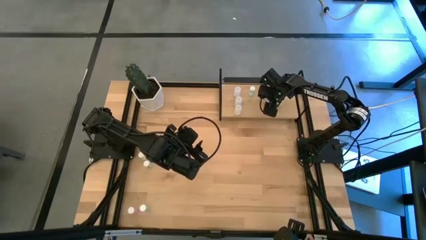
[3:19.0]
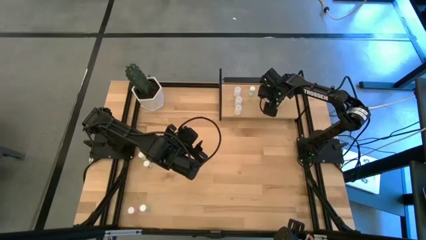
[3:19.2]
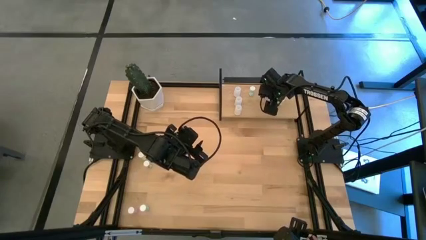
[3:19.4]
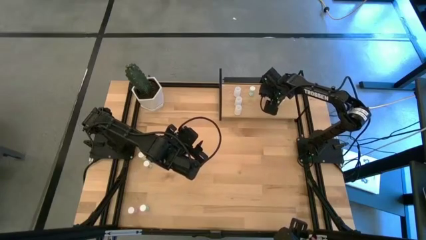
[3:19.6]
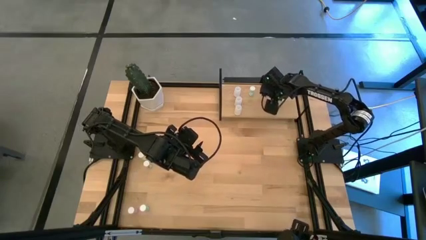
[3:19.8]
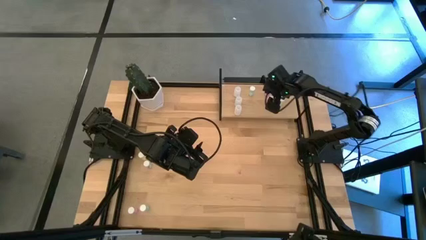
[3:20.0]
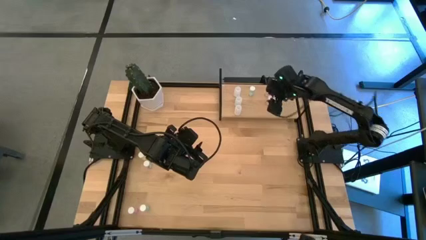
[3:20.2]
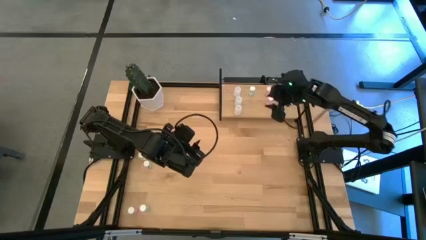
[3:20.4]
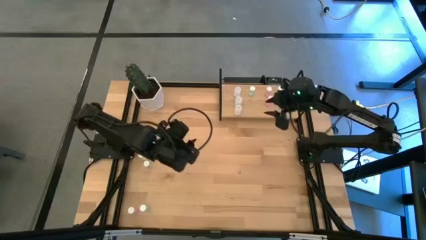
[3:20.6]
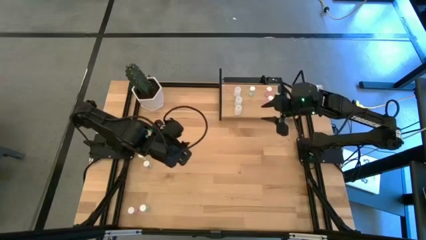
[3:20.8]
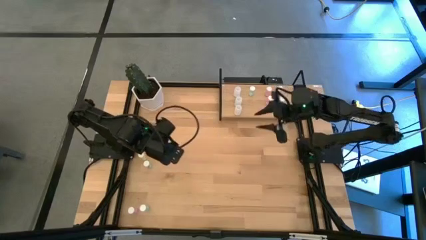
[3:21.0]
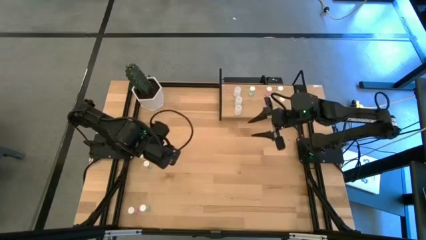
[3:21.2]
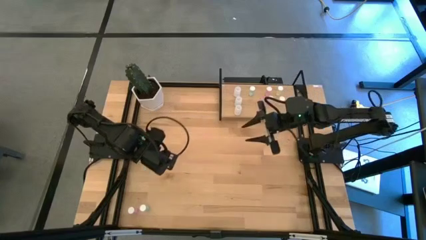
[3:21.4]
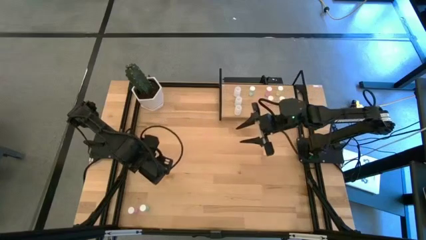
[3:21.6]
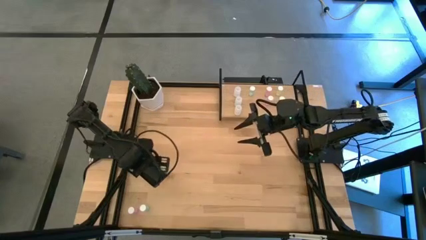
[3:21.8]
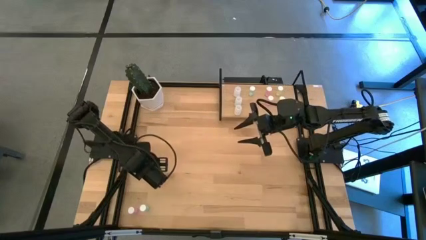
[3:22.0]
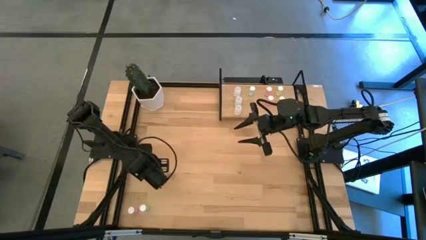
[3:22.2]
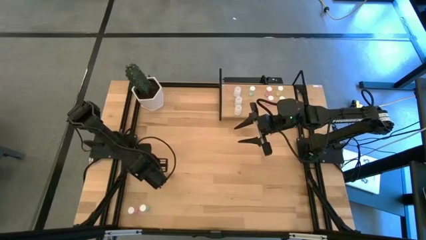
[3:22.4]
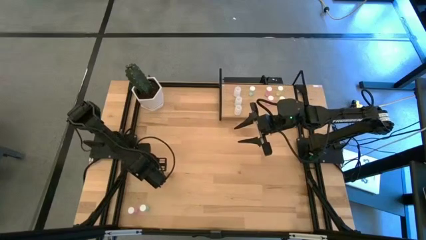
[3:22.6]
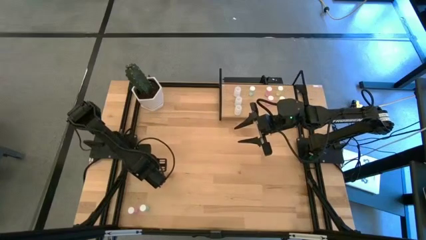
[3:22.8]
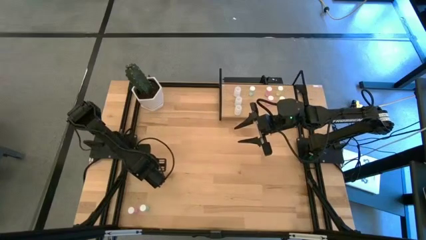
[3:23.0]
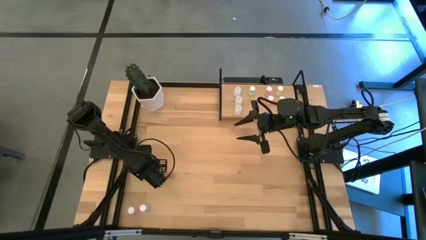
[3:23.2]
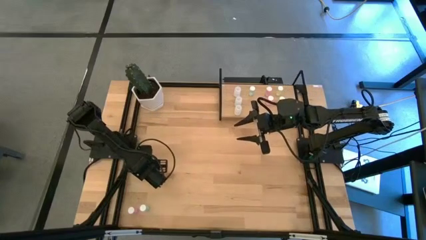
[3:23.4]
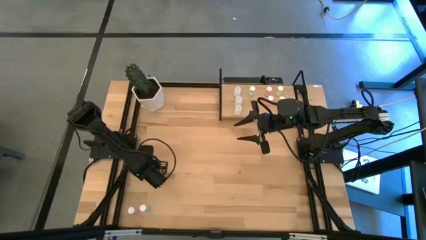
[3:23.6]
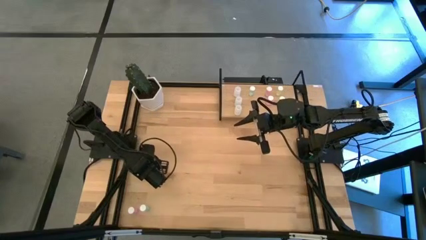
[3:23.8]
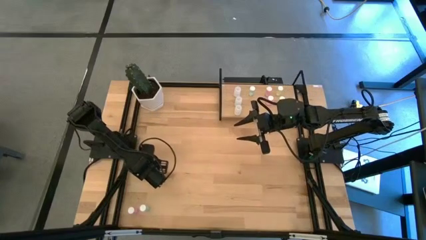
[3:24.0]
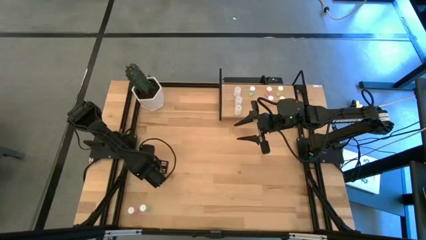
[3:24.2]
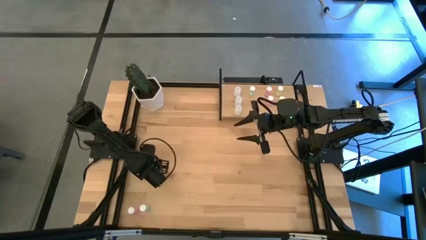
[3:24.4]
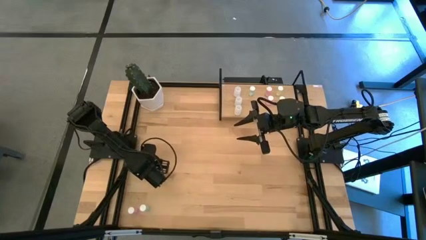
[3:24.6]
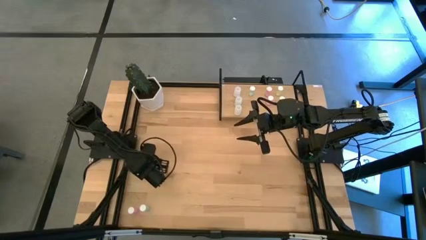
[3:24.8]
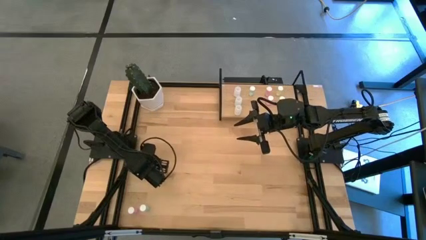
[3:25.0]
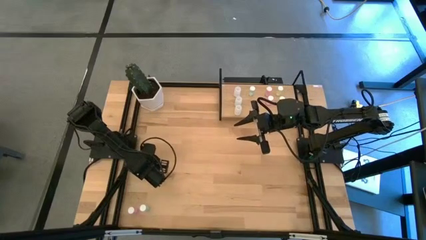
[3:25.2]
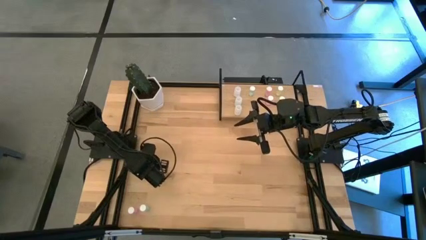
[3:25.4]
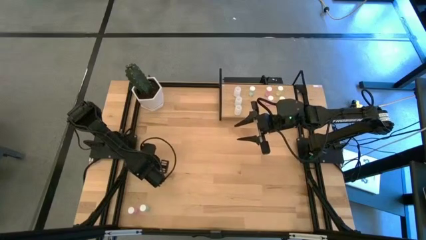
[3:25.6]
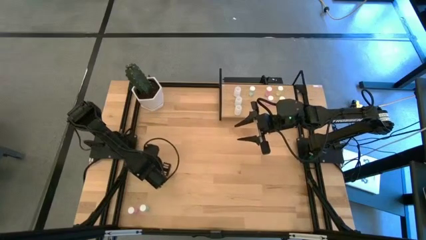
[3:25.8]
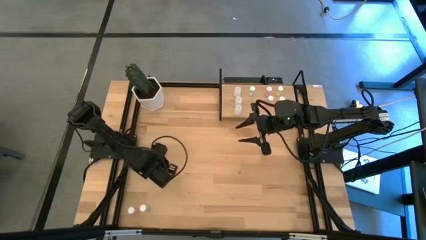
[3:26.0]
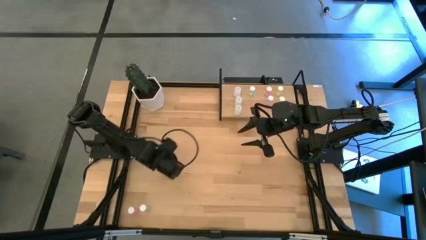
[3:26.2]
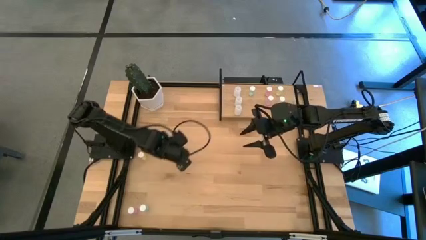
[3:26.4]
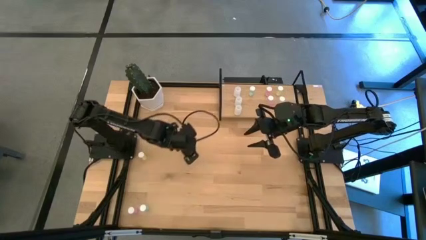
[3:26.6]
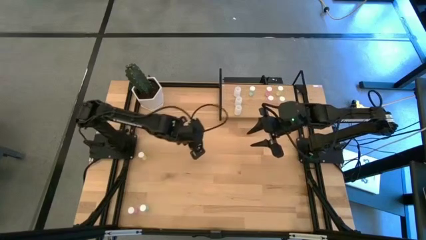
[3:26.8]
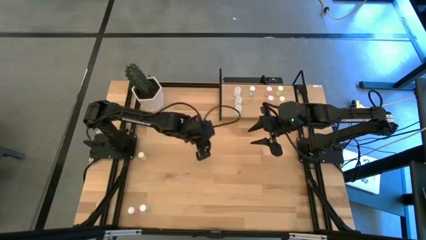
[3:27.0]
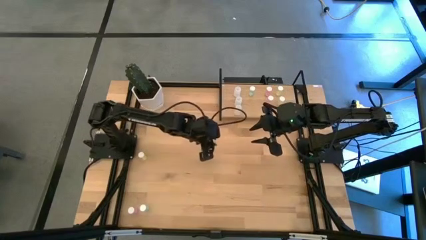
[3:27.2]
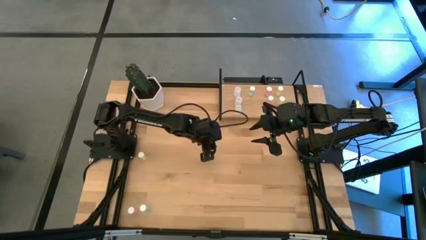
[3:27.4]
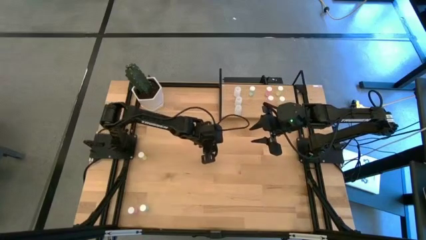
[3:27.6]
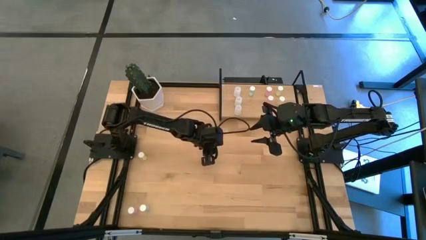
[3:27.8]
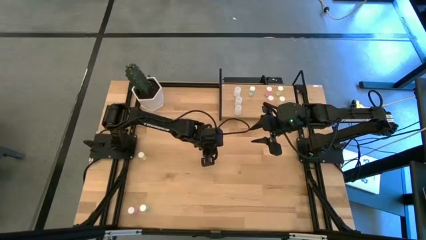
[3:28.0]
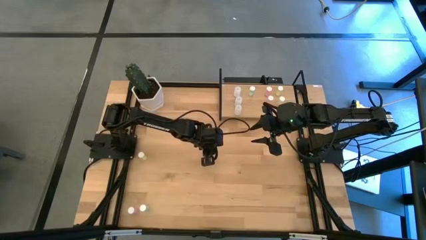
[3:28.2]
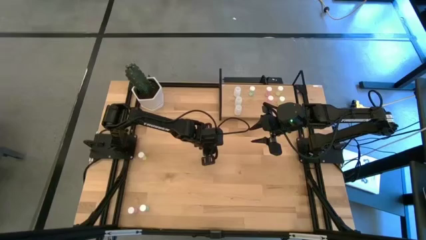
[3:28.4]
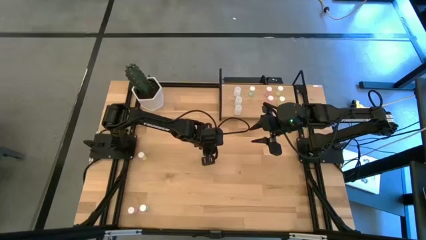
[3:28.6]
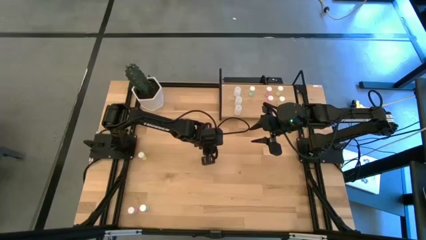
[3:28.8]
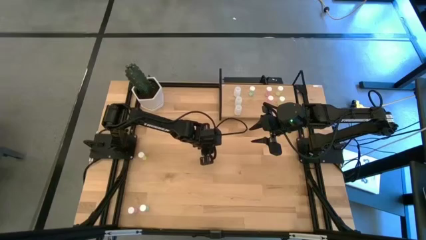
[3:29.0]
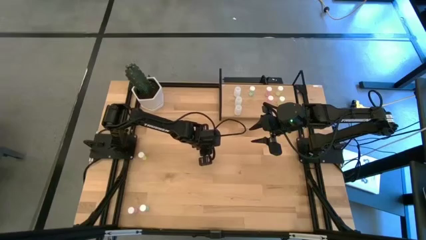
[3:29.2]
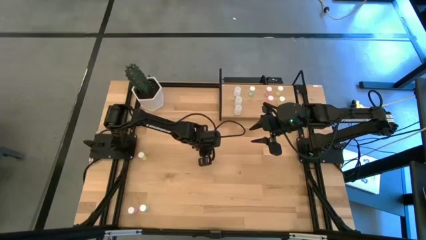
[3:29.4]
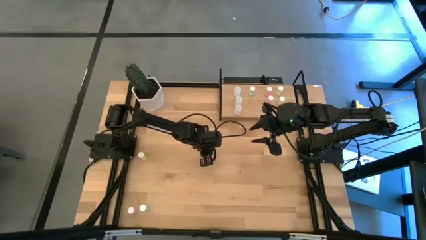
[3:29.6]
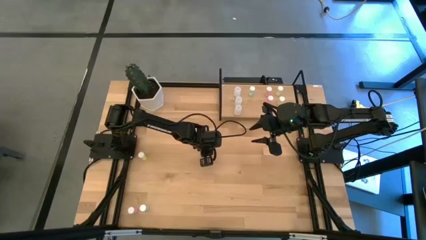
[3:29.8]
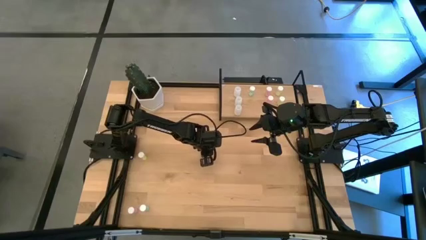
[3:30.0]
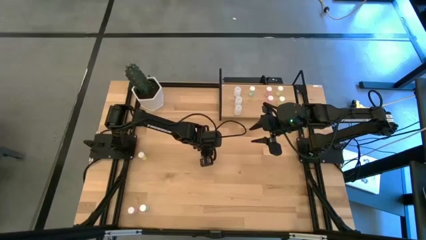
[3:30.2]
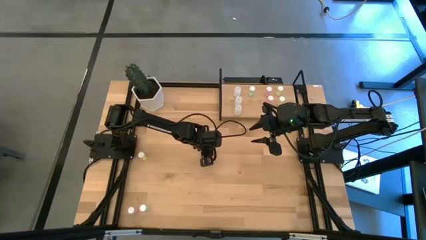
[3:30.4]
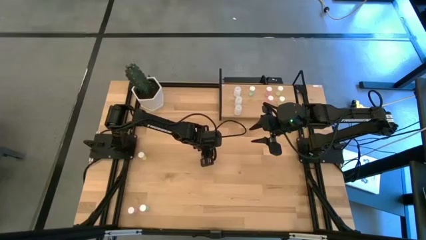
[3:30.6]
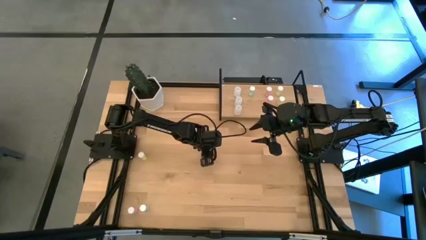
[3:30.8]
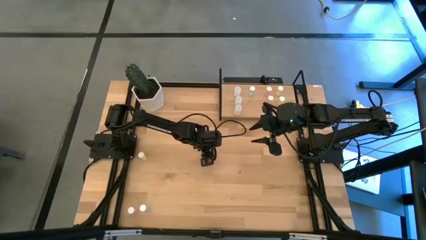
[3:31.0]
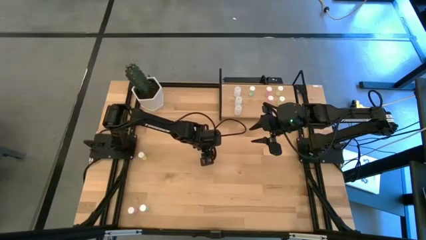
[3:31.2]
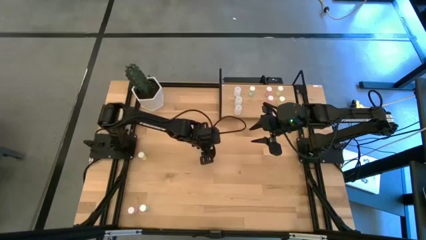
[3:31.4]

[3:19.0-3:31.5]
Task: Pick and place medicine bottles onto shelf by color
Put the top green pill bottle on the shelf aligned with the other green pill bottle

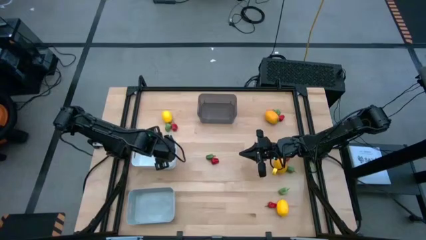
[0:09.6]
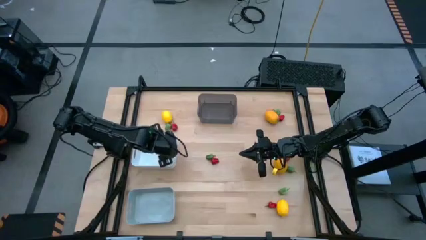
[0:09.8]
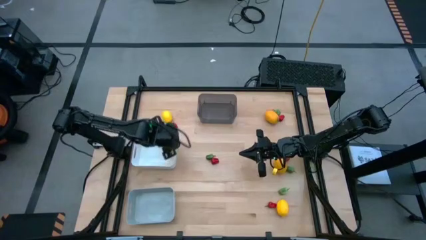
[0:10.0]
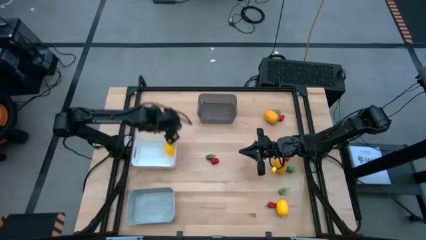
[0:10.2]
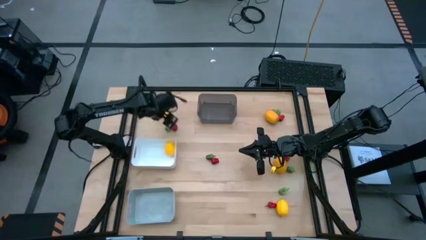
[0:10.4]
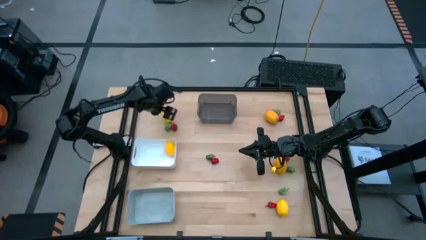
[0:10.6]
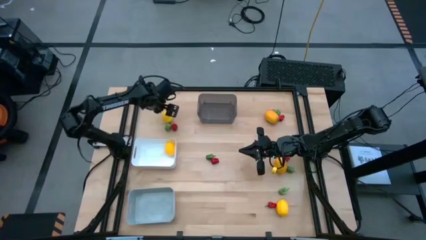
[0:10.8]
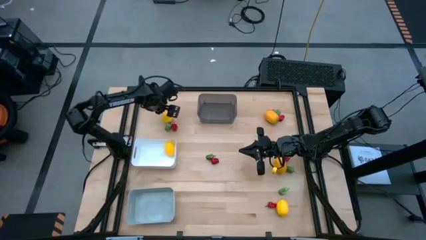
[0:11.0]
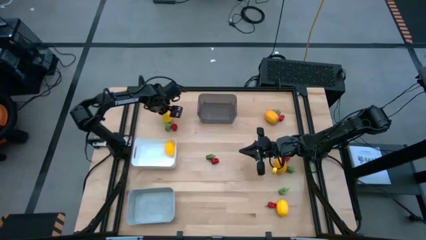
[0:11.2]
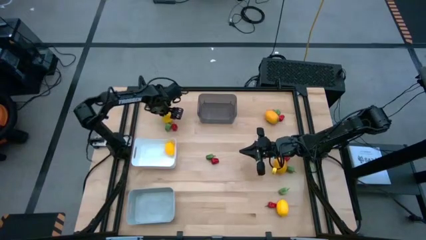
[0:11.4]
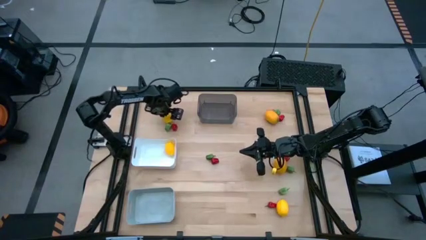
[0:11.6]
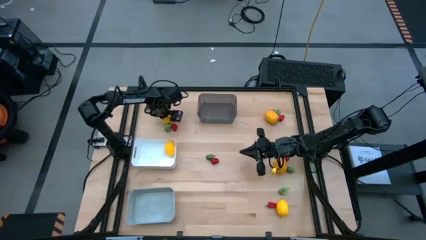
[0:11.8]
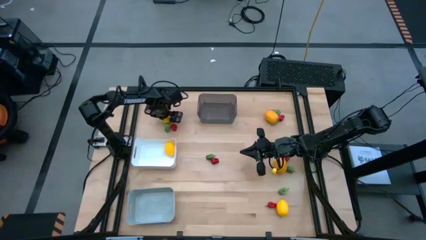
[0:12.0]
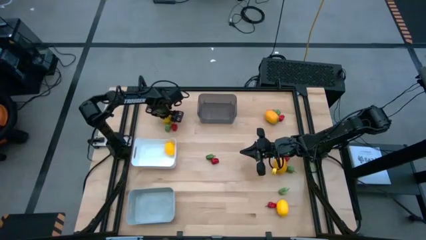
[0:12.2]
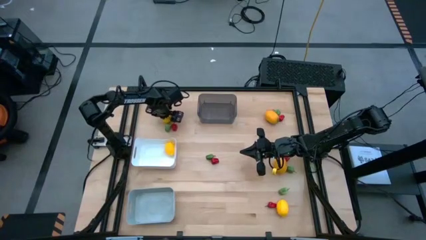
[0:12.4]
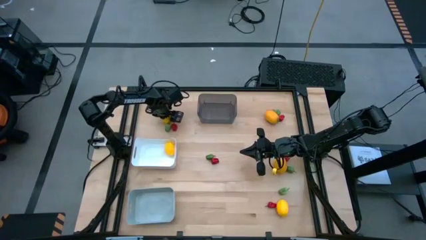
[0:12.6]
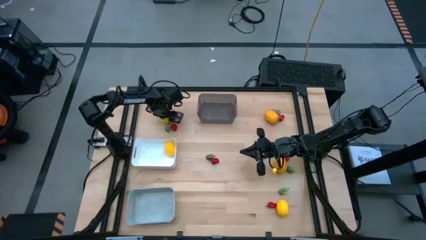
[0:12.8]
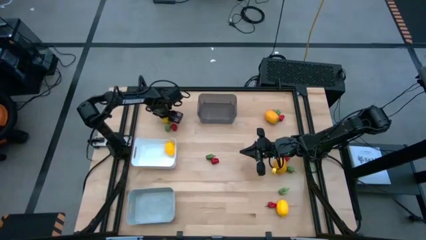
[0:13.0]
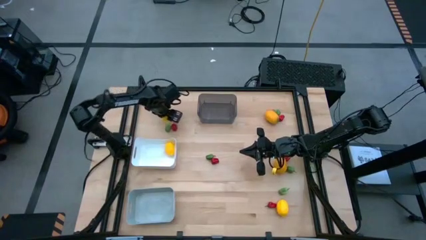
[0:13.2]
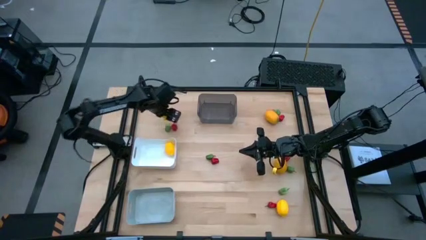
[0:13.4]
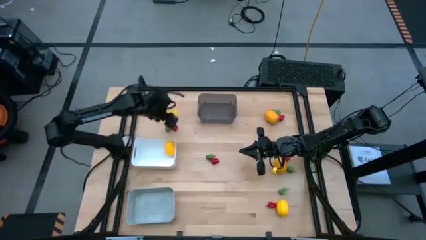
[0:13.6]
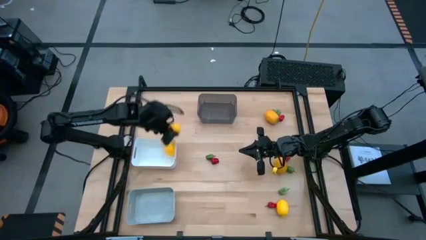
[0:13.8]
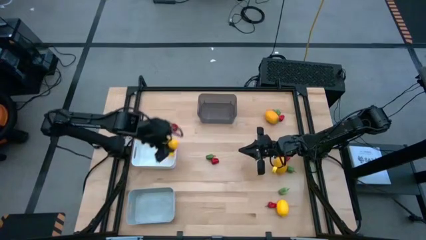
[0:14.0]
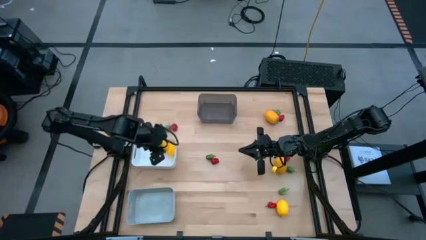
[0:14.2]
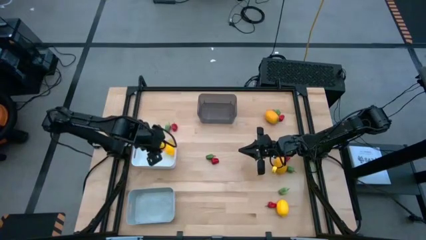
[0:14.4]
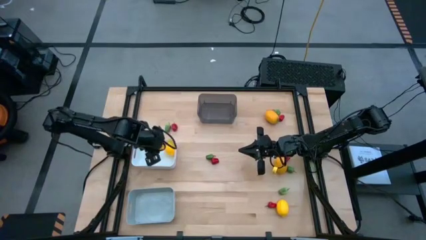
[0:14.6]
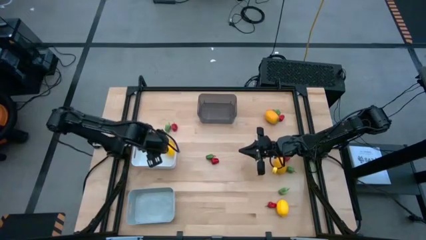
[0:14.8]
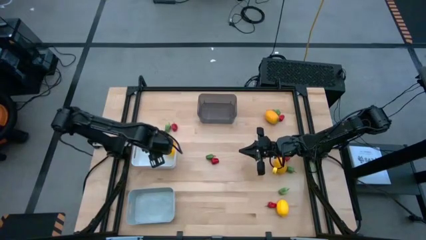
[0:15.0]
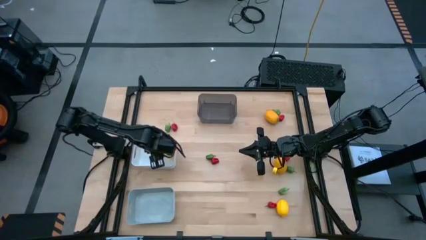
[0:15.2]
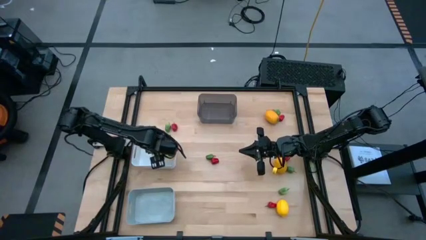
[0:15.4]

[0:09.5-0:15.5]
Task: Sort produce into baskets
Put the lemon into the white bin
